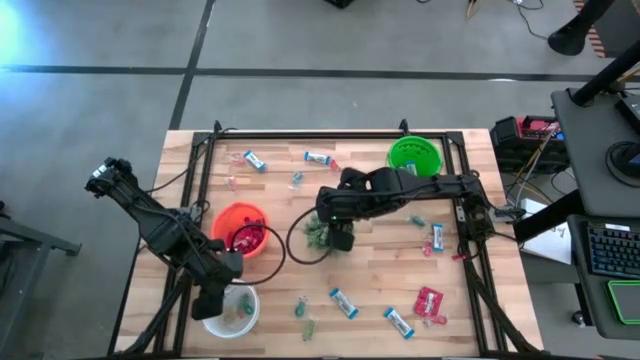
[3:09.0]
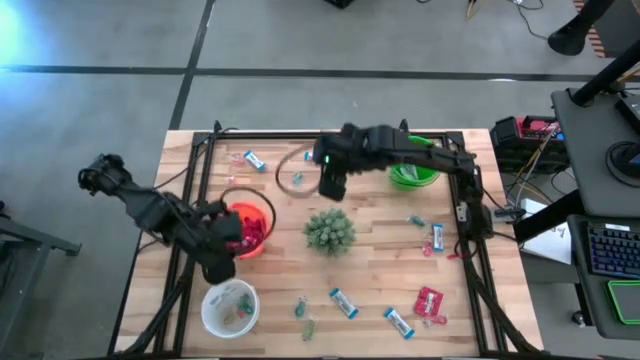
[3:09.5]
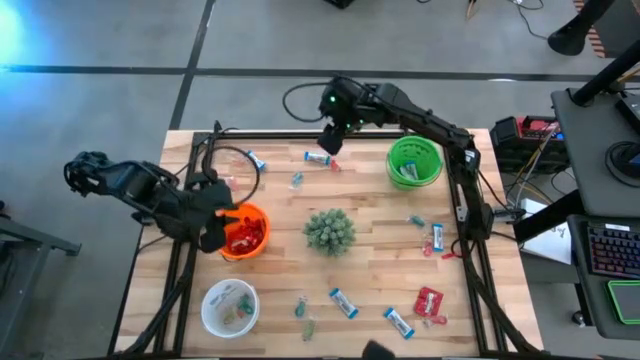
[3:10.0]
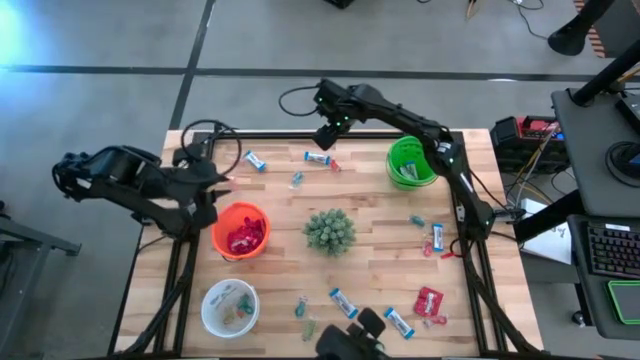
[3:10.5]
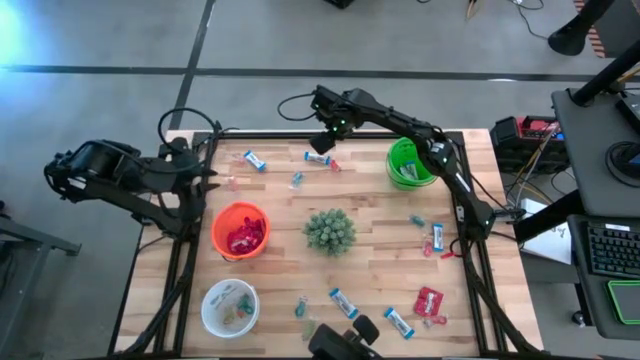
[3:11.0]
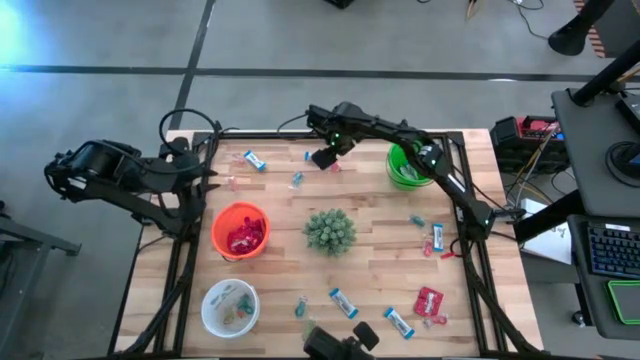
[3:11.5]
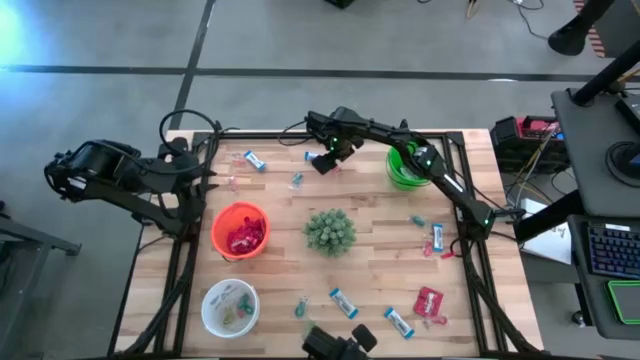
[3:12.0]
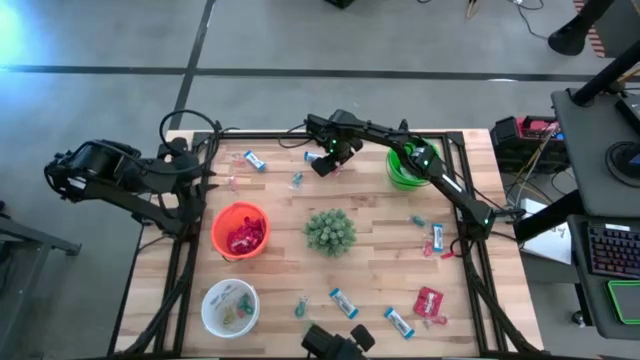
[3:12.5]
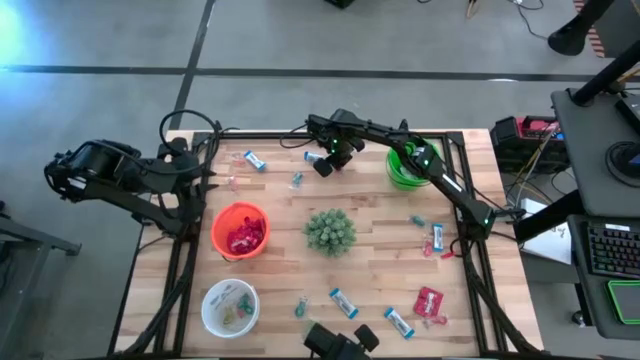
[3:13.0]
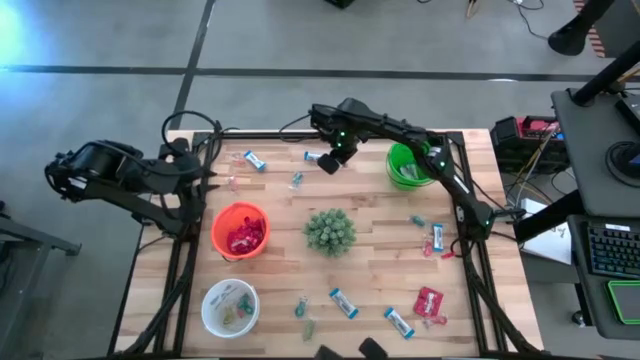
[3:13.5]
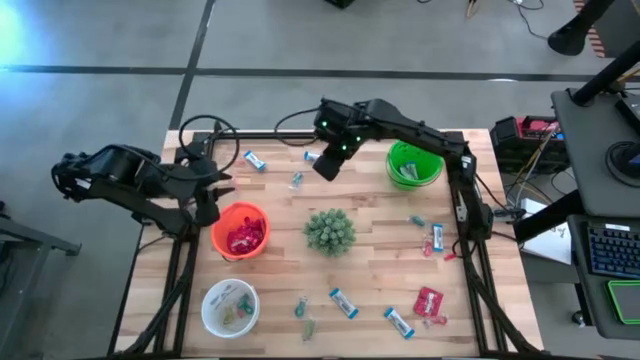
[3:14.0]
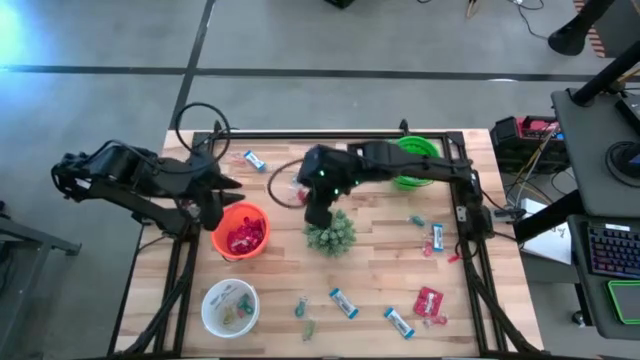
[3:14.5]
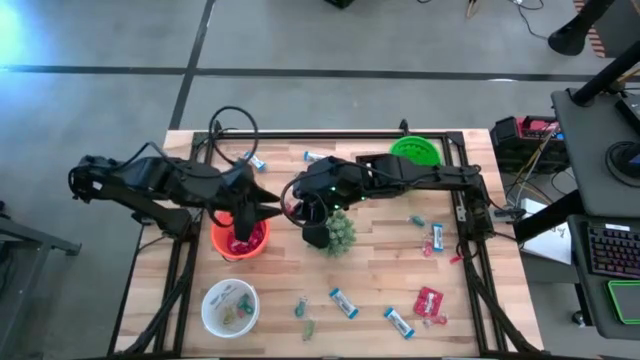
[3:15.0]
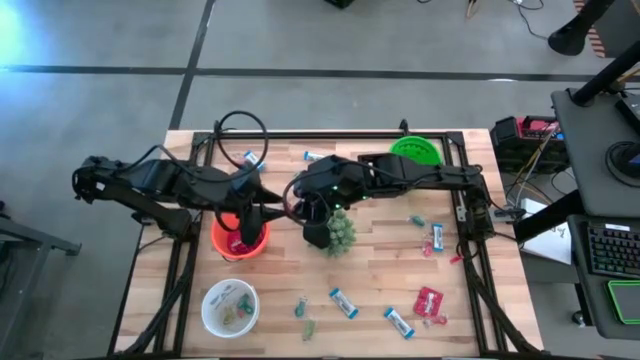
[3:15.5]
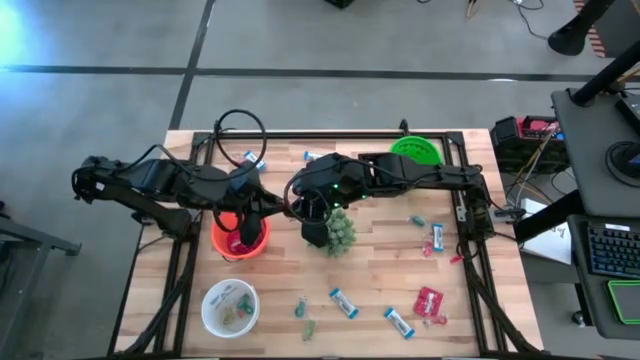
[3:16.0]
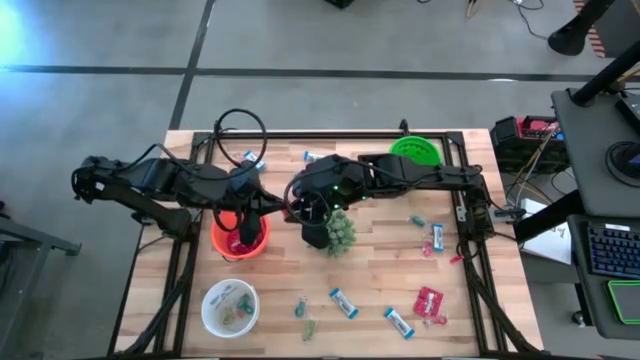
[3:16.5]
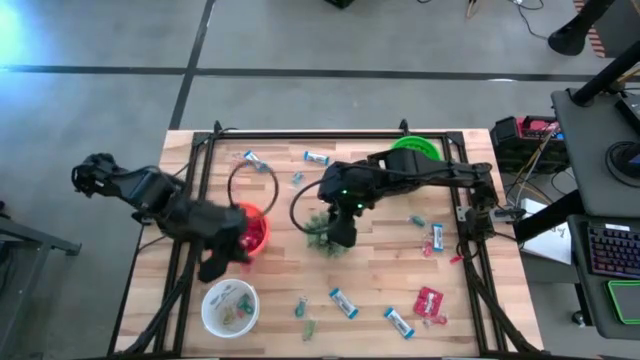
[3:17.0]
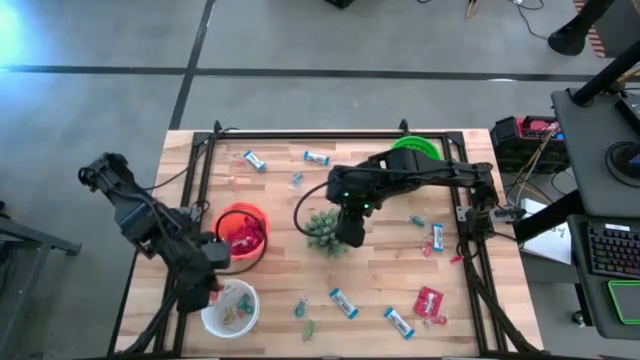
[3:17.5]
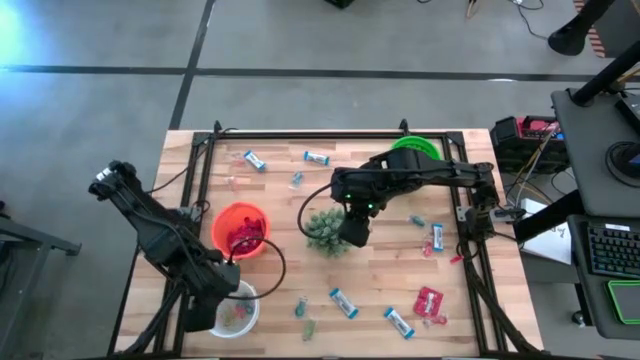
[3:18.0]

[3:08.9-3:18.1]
Task: Sort candy
Put the red gummy into the white bucket

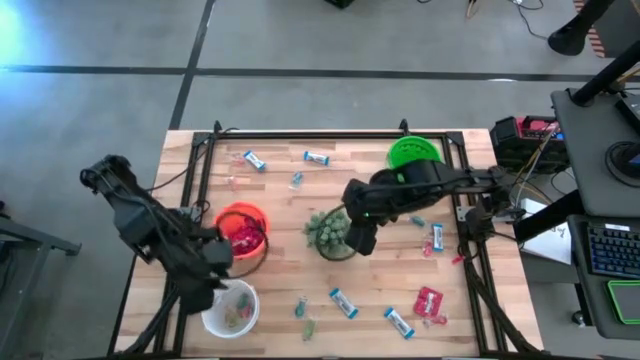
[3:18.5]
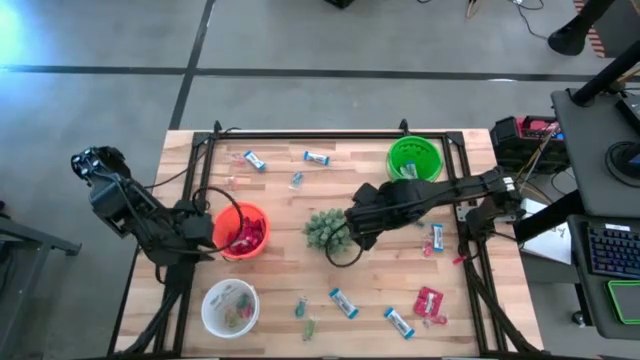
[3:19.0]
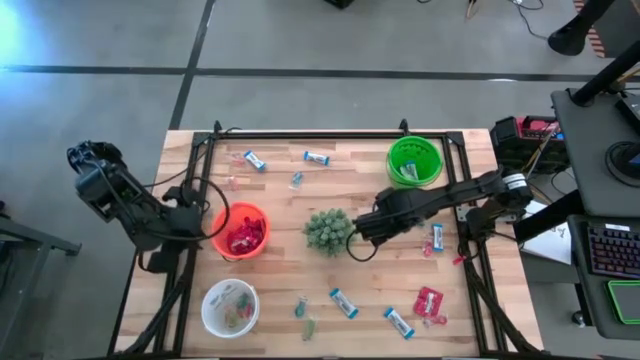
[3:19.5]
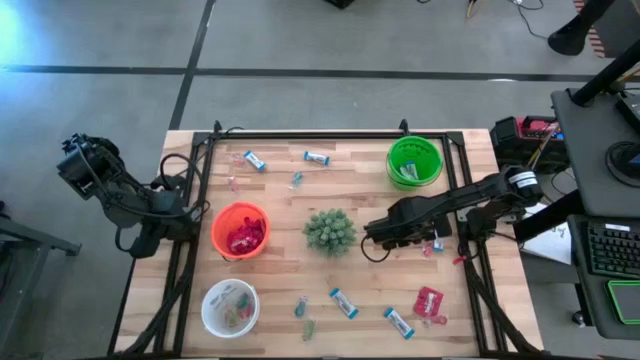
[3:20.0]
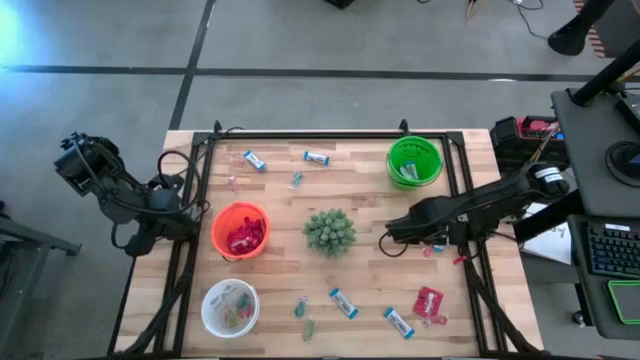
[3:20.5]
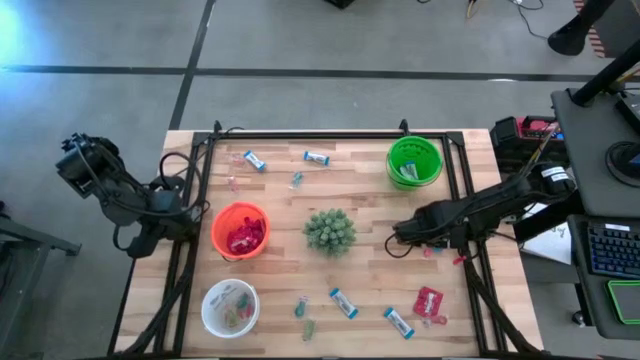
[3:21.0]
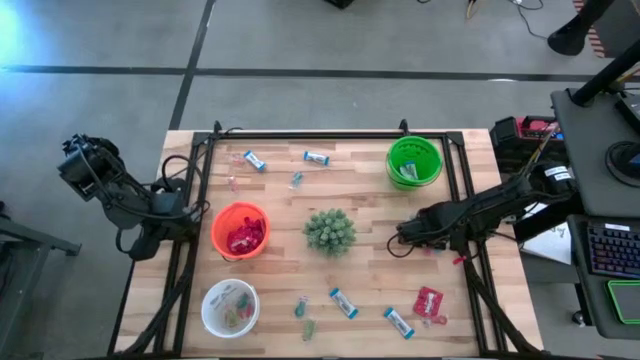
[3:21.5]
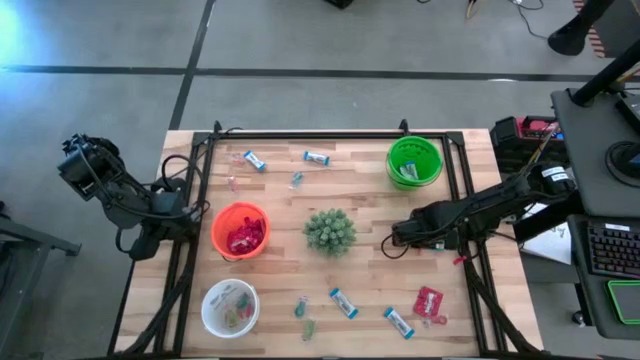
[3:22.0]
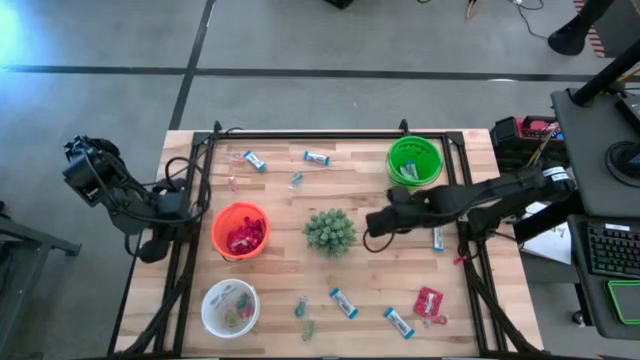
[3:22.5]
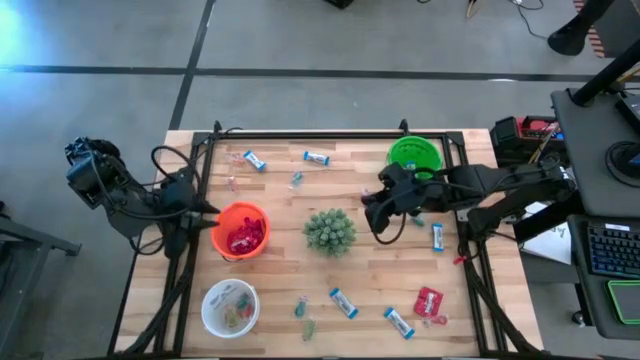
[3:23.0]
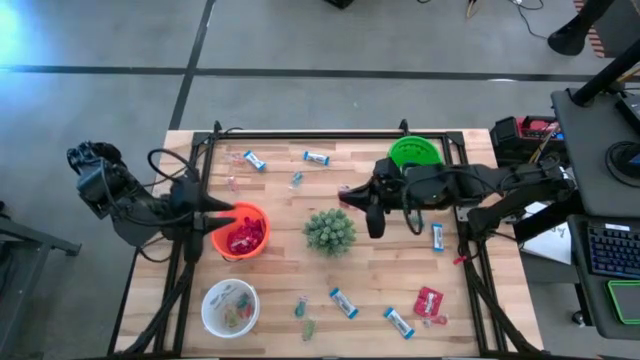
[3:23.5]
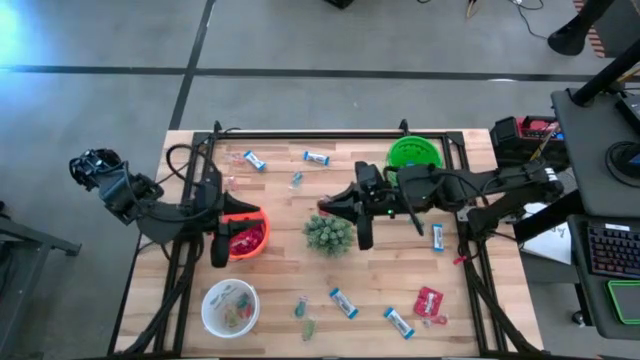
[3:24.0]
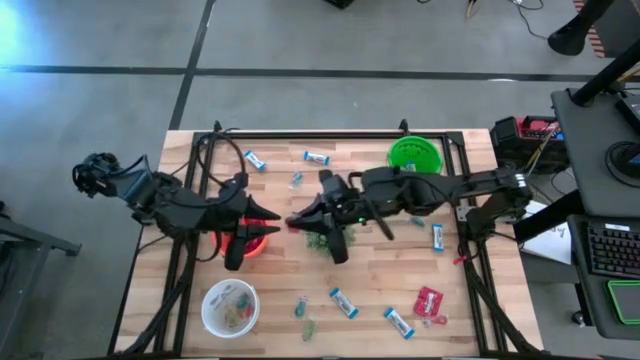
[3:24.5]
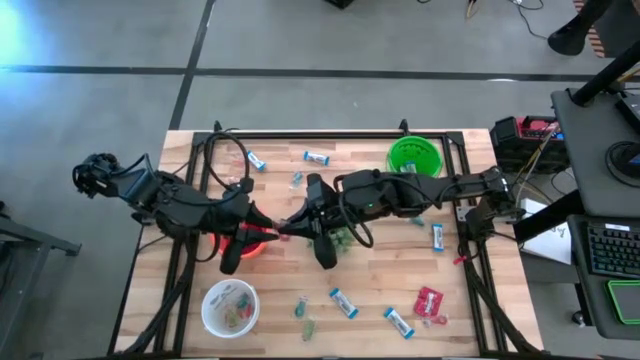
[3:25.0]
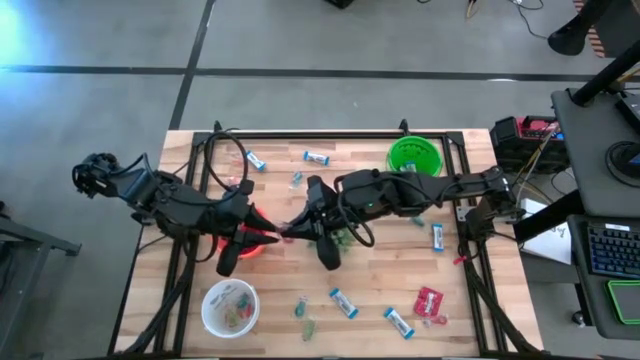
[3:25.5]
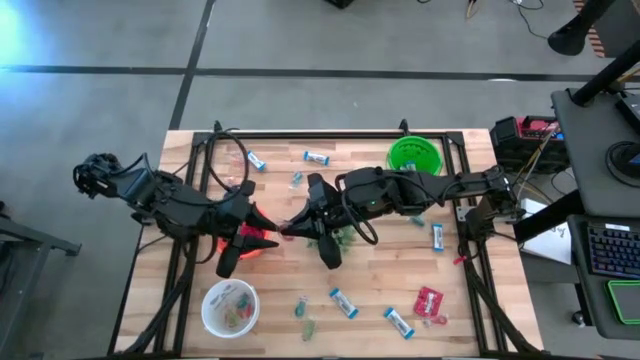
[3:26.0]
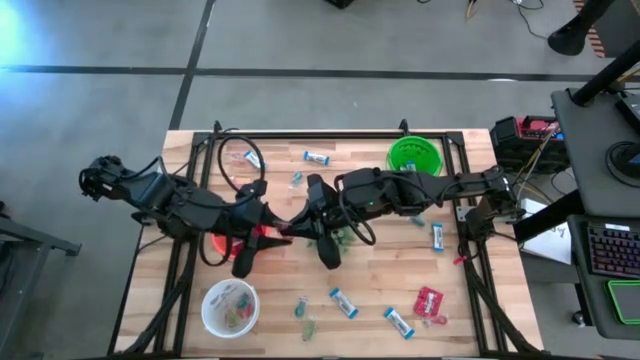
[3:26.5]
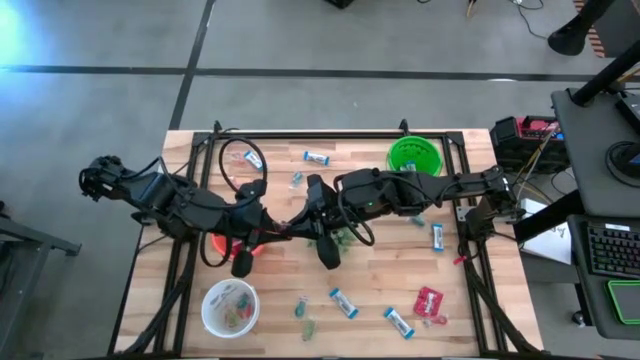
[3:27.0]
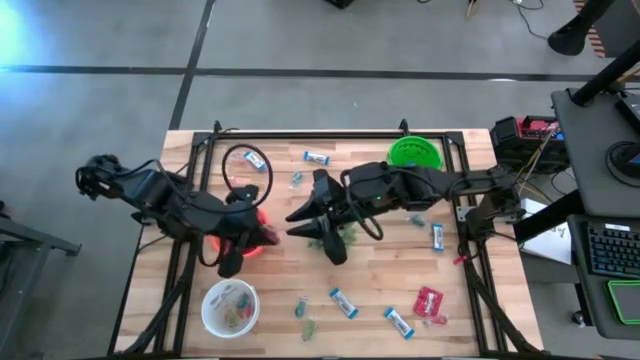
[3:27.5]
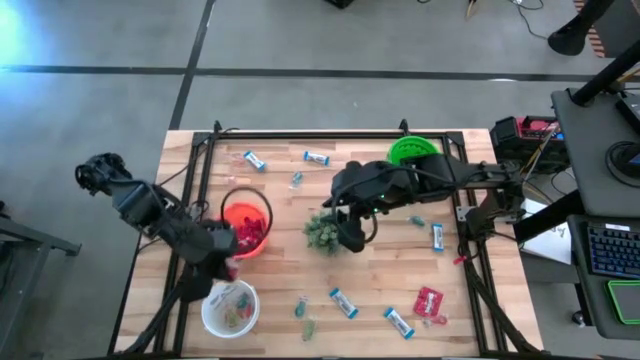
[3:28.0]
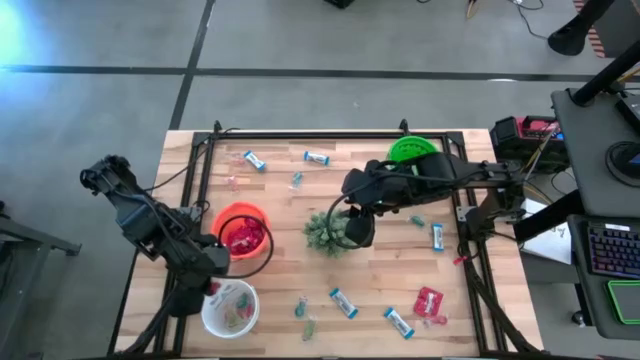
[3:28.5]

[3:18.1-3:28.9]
Put the orange gummy into the white bucket
